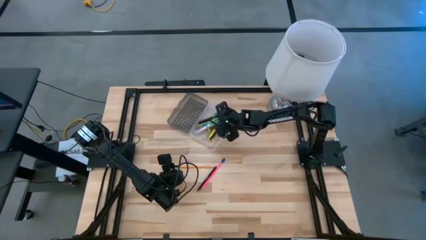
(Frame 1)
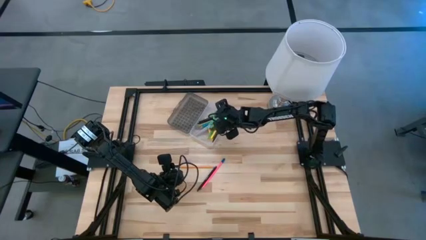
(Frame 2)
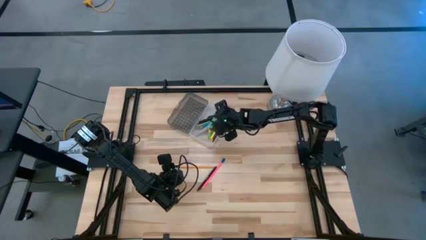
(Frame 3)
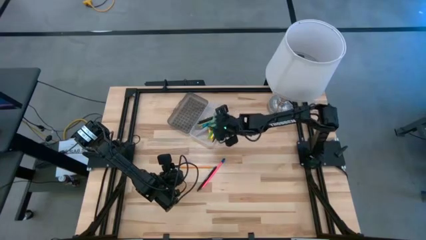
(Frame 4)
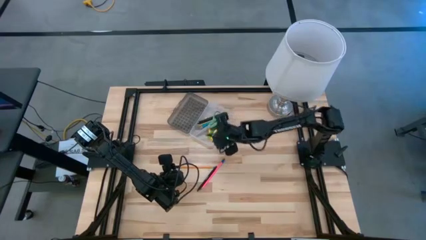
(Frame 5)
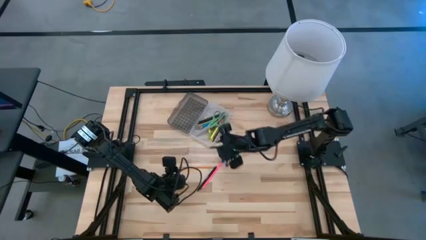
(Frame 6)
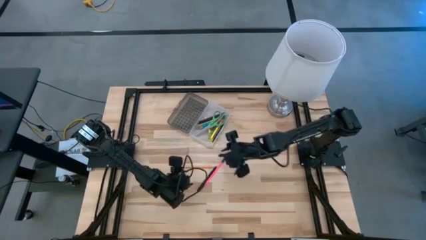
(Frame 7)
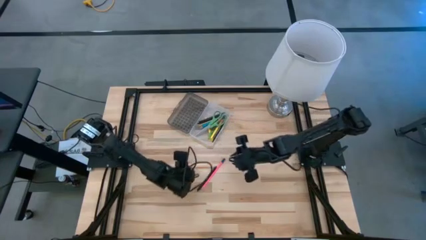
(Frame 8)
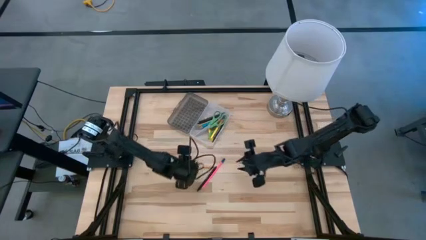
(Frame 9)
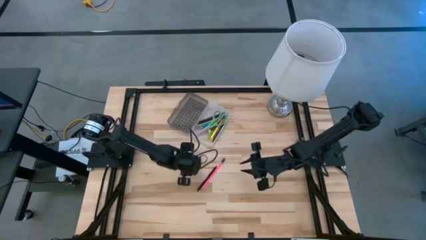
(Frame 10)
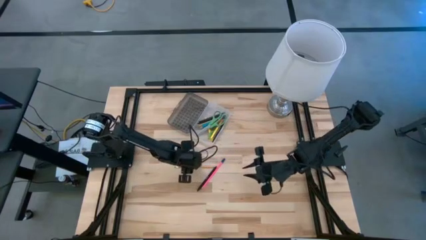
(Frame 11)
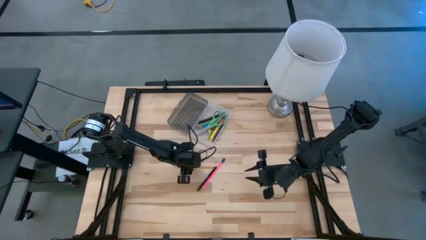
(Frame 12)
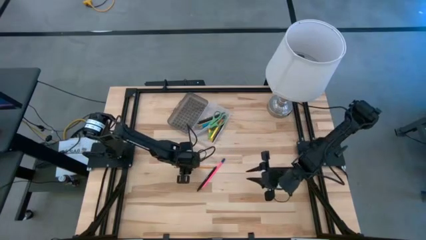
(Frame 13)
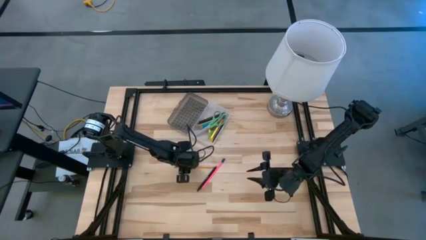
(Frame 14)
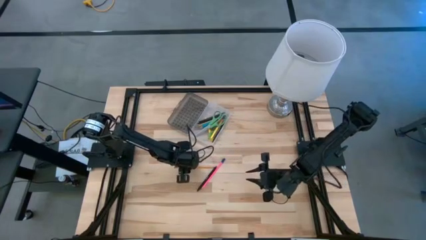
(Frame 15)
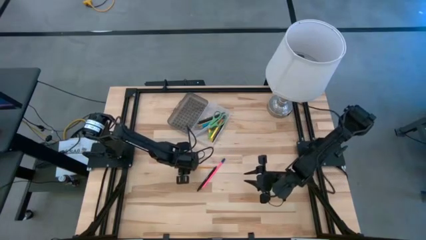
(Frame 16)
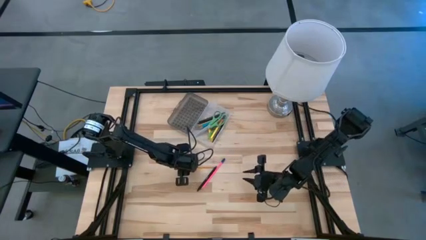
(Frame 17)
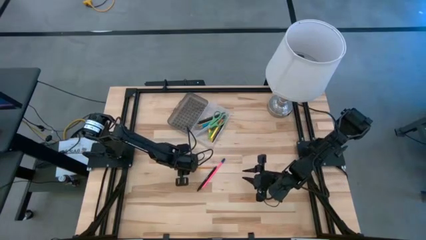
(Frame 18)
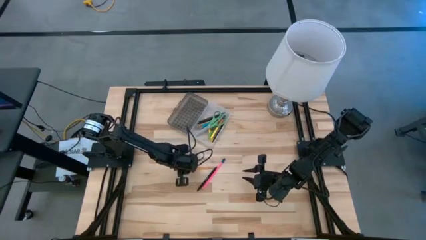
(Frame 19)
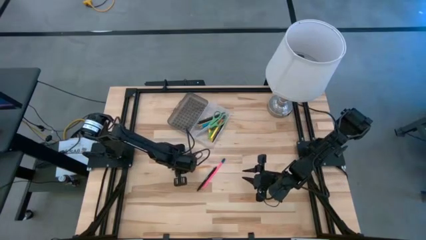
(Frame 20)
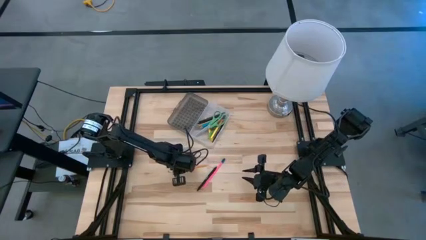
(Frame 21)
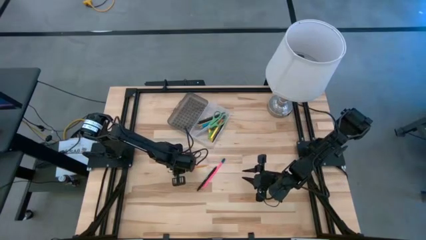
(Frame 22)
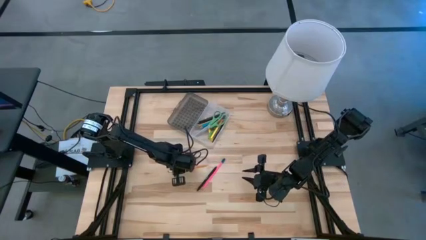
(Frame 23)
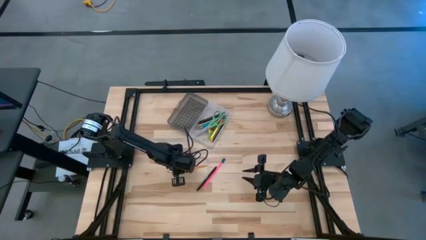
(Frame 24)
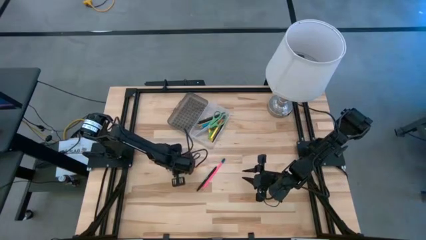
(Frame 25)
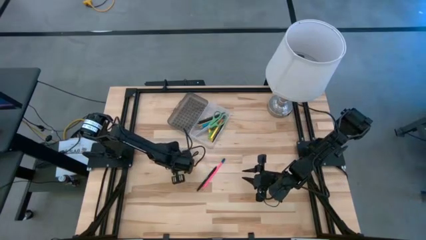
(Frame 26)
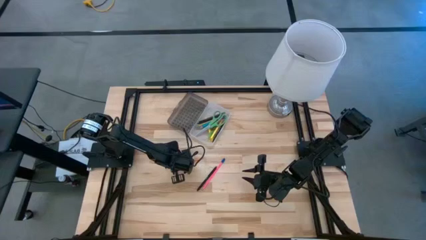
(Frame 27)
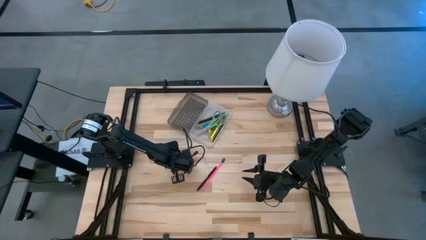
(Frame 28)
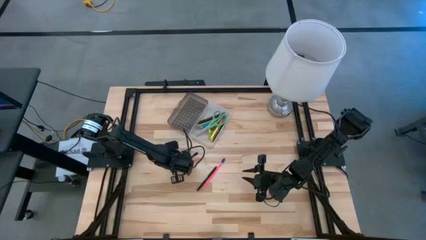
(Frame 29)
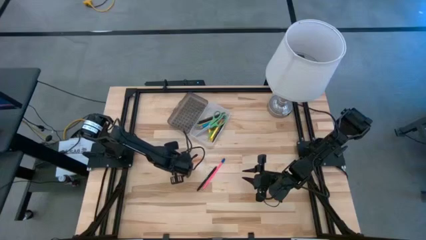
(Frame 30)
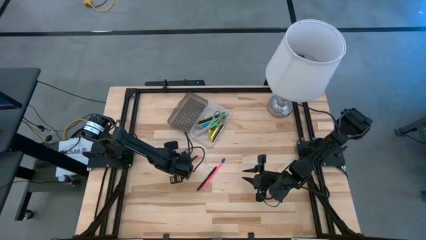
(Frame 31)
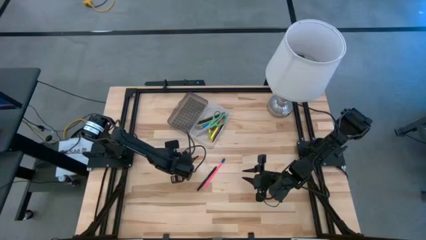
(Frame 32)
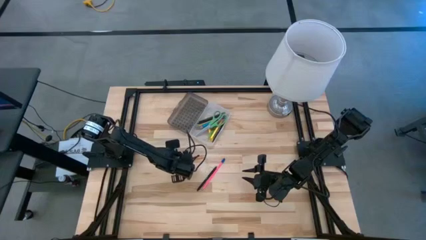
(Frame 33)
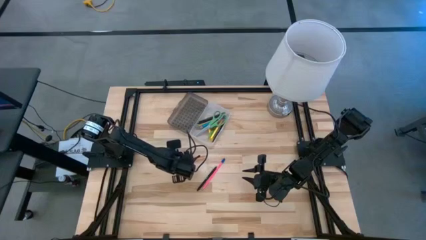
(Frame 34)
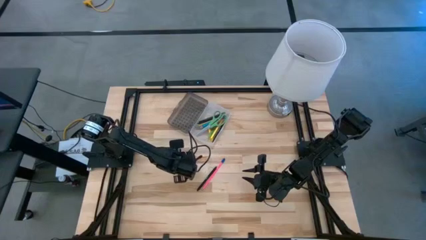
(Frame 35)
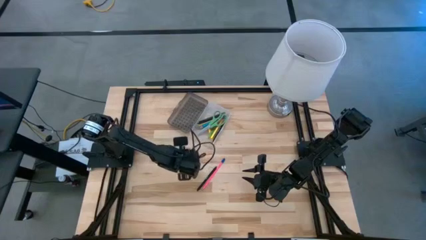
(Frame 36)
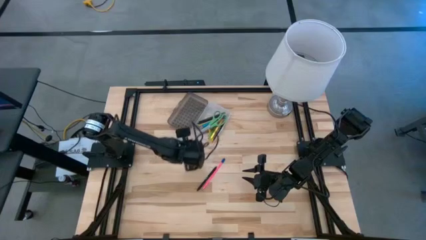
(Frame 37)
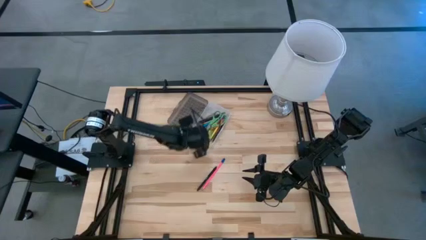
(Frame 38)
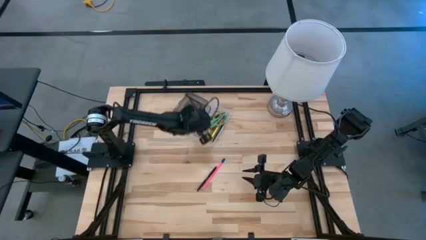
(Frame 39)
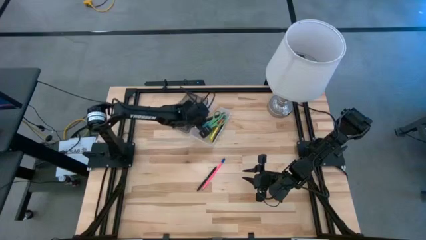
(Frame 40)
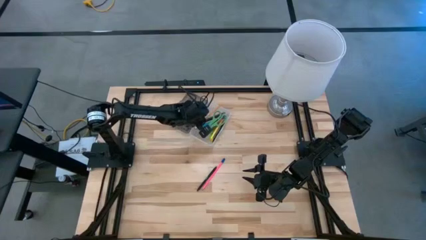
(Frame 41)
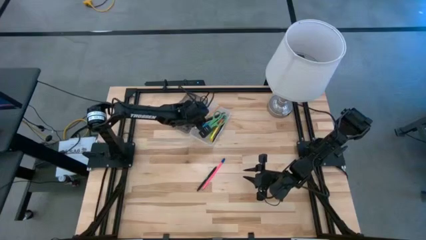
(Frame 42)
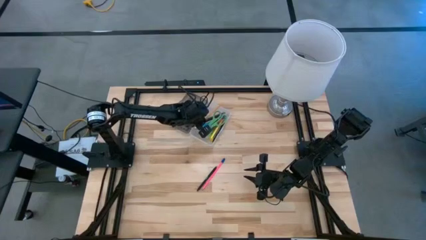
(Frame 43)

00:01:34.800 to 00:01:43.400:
Task: Pick & place school supplies into a supply box
Put the orange pencil into the supply box

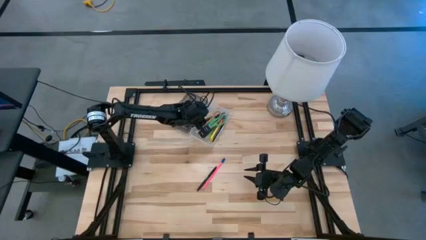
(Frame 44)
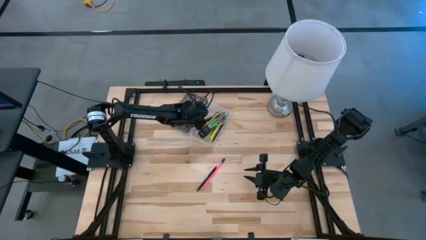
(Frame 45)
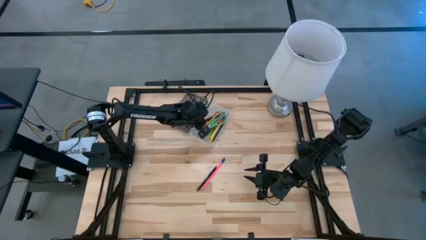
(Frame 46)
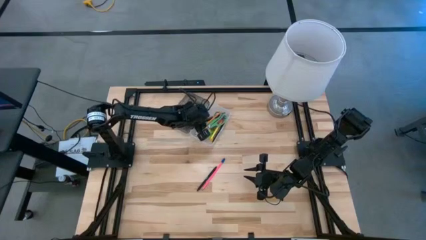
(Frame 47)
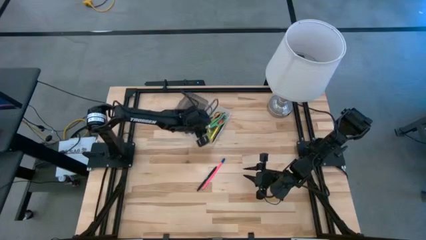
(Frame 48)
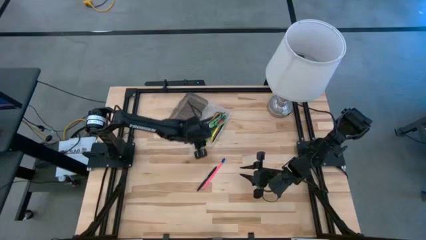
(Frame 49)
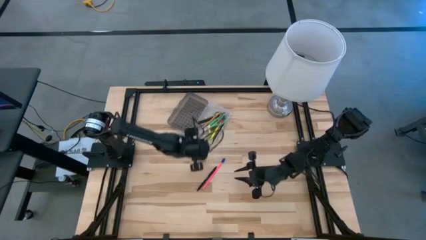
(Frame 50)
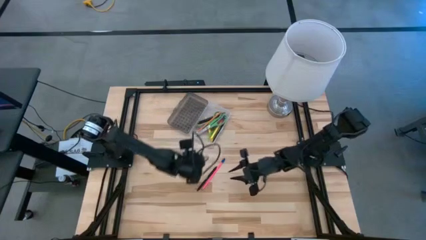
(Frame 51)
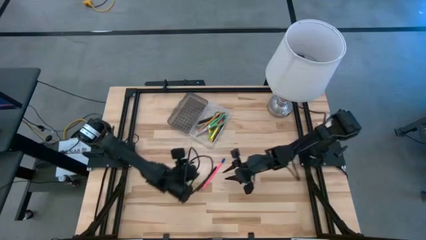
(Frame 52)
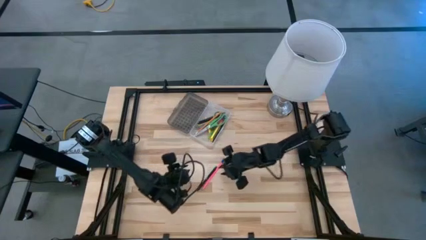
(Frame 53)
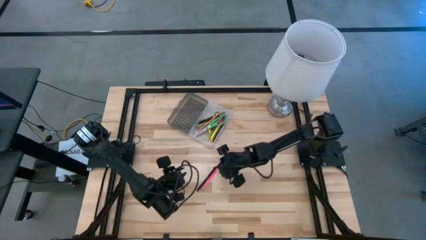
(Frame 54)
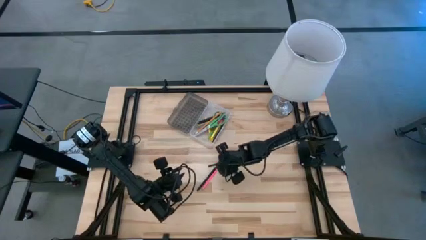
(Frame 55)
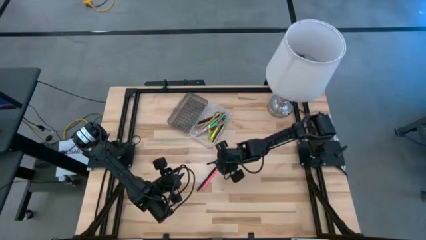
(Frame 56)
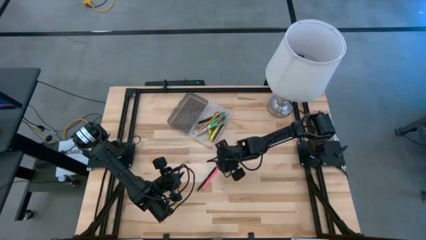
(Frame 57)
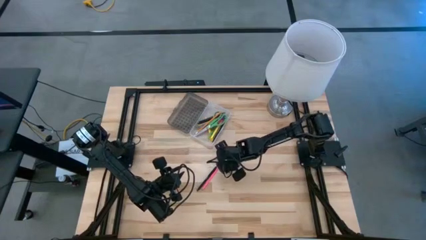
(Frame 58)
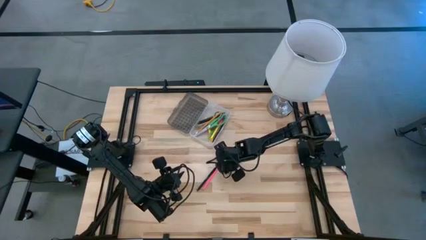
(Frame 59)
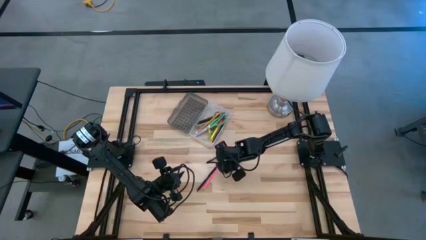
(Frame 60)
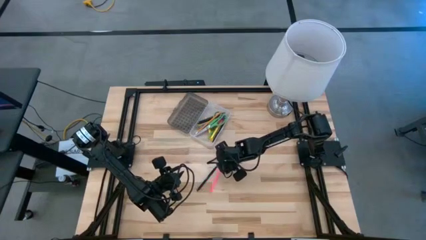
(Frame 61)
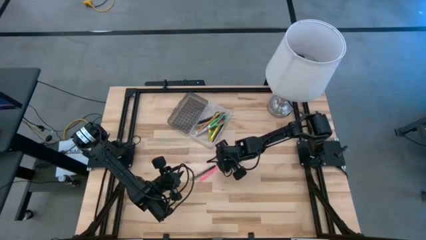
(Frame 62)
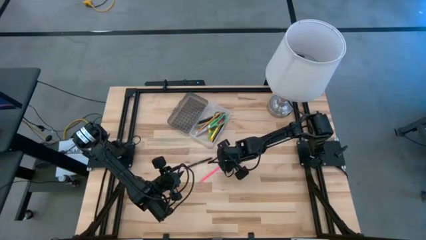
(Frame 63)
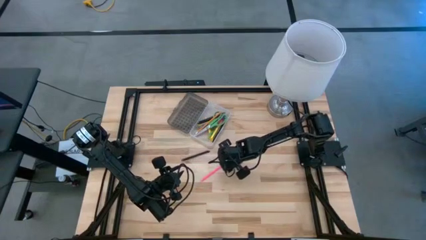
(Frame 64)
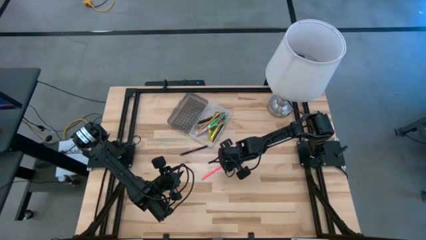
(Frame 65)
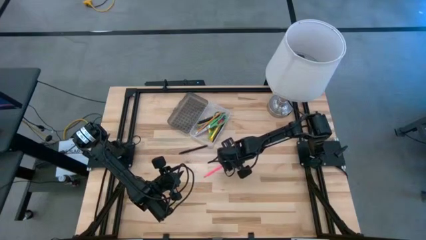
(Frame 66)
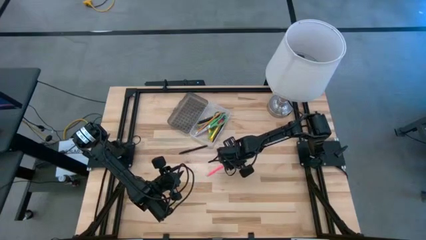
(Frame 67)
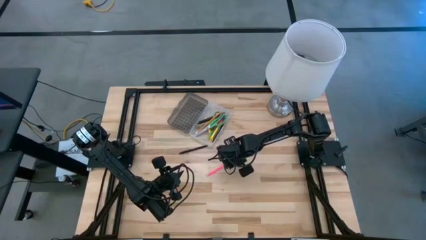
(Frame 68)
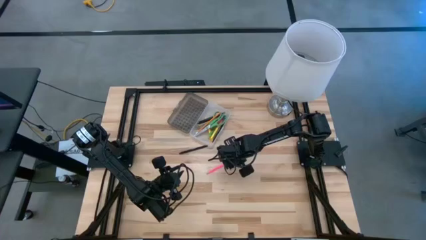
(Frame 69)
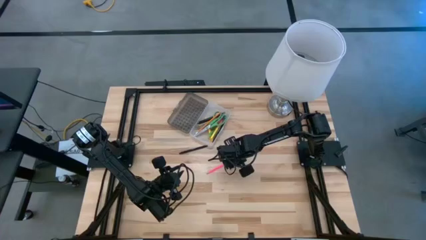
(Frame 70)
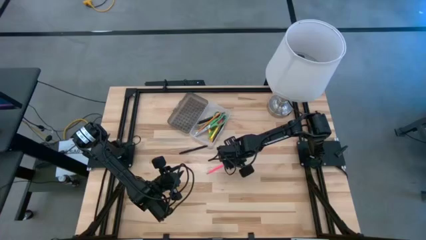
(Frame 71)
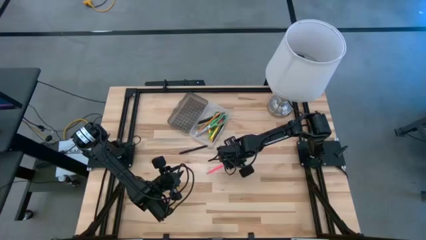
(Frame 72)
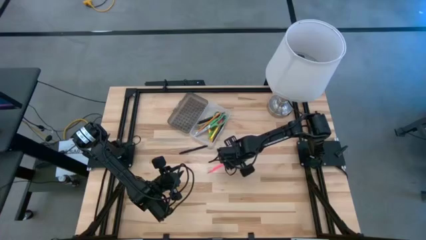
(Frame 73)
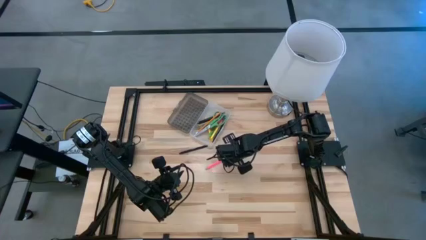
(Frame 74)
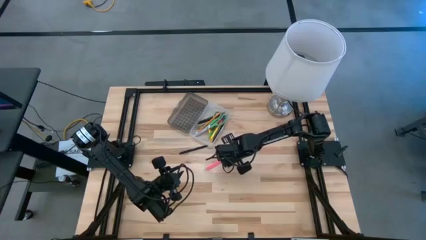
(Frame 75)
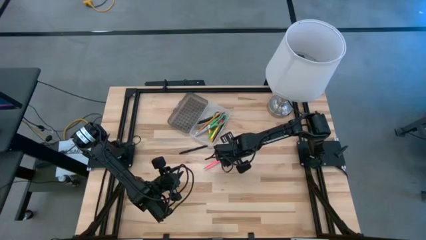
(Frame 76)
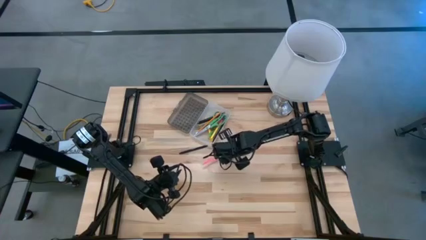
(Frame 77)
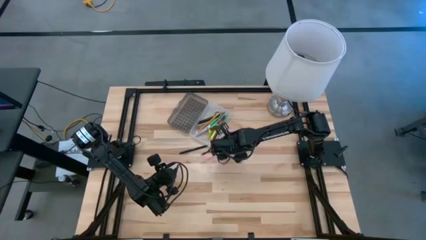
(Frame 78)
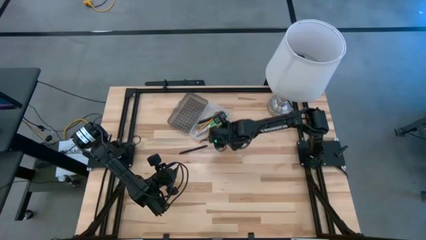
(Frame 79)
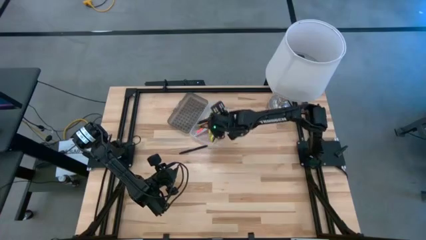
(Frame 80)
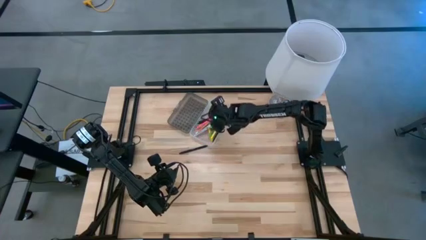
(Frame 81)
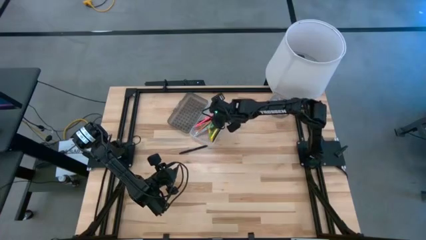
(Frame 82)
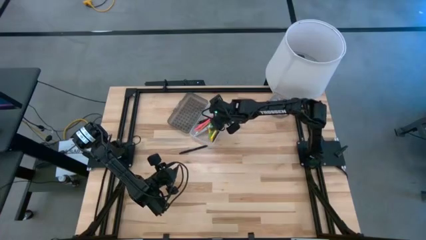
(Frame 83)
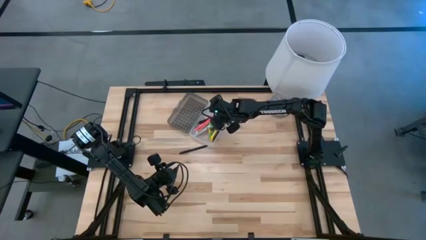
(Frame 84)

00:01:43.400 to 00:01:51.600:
Put the pink pencil into the supply box
